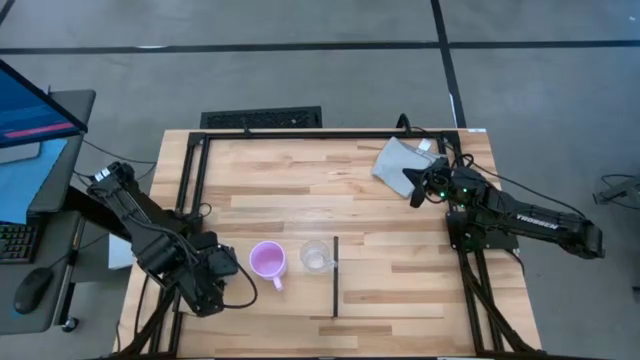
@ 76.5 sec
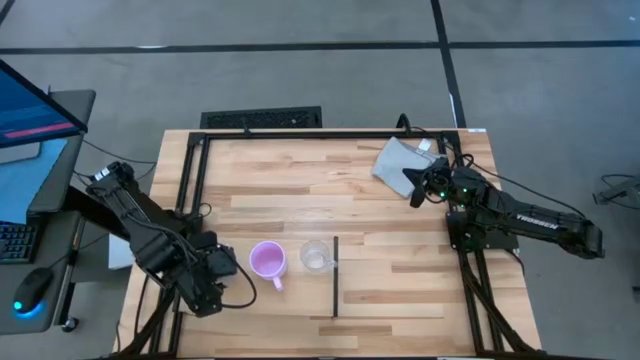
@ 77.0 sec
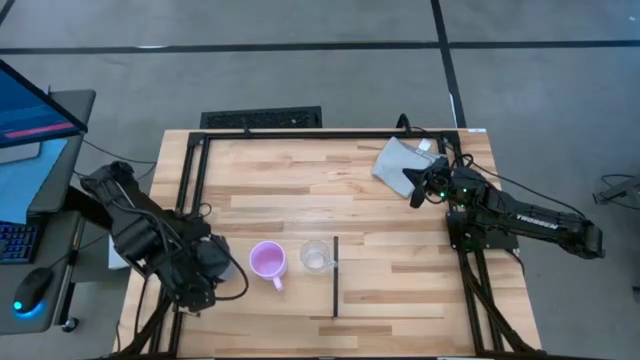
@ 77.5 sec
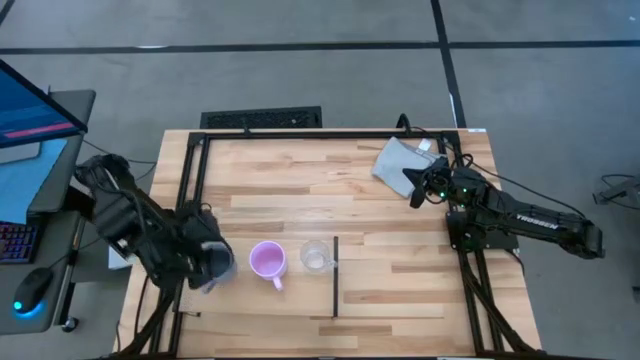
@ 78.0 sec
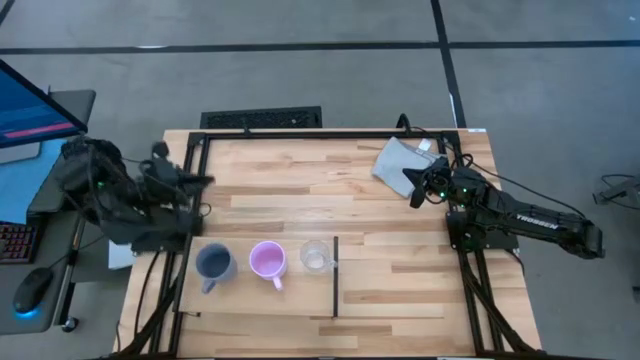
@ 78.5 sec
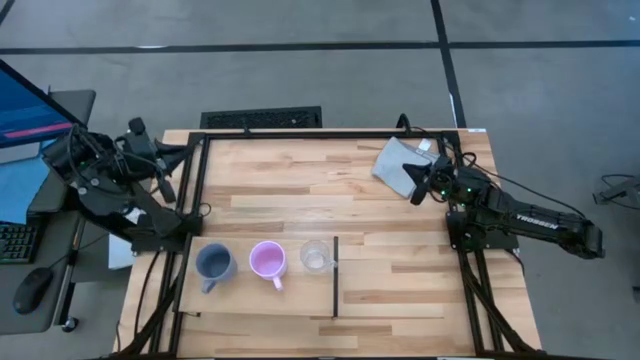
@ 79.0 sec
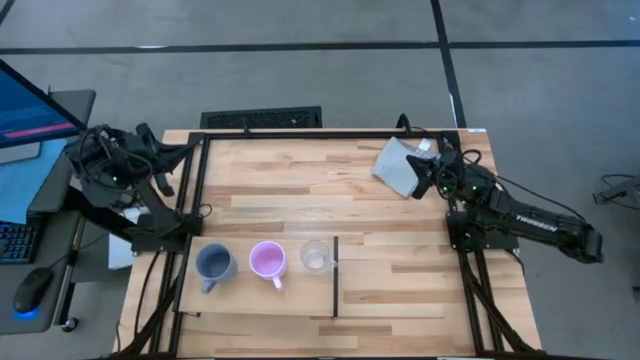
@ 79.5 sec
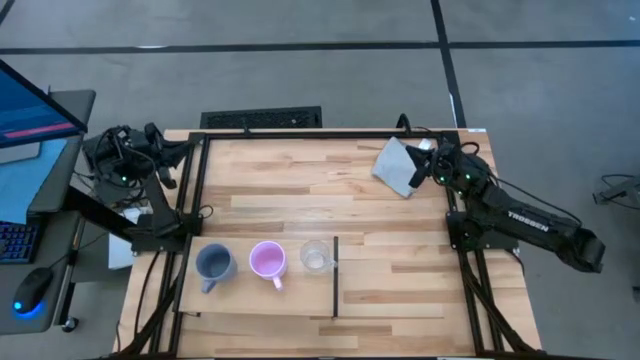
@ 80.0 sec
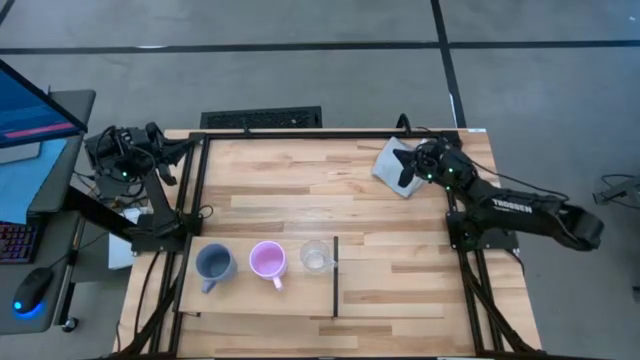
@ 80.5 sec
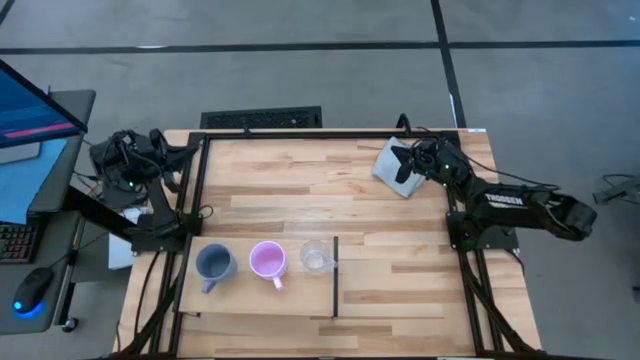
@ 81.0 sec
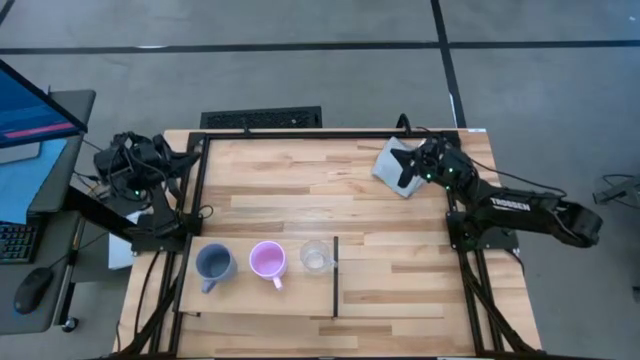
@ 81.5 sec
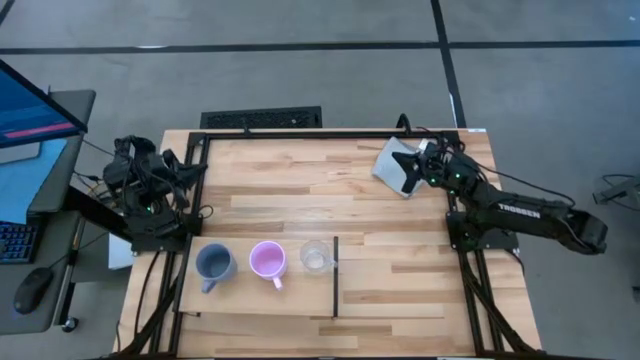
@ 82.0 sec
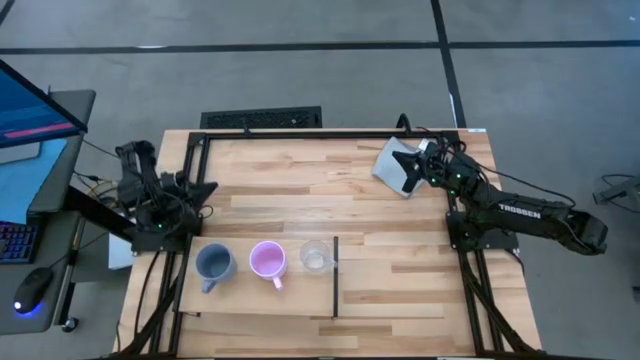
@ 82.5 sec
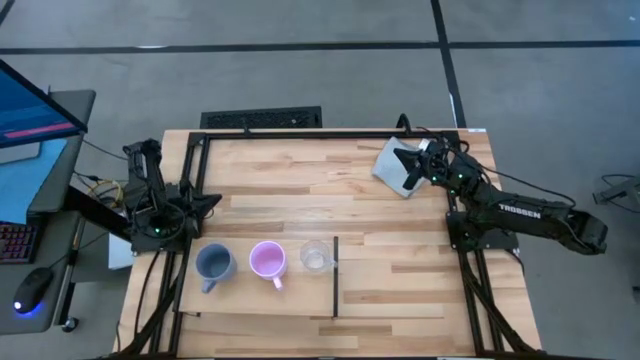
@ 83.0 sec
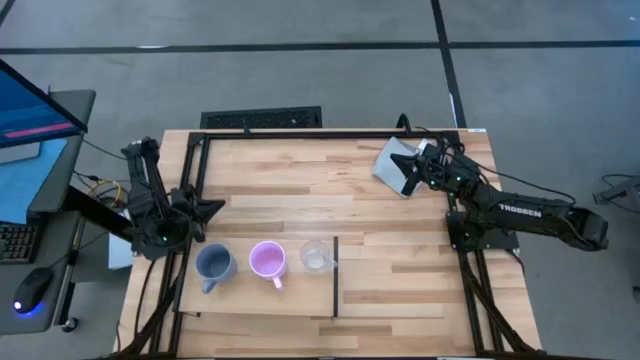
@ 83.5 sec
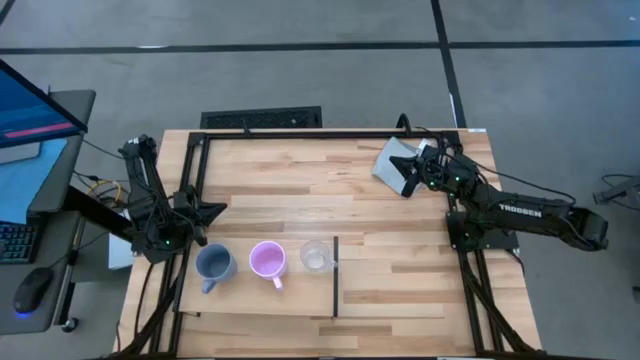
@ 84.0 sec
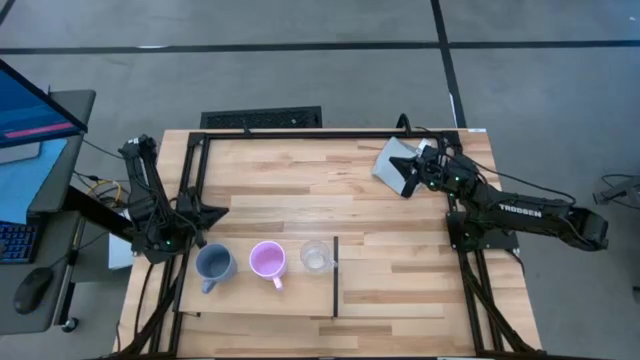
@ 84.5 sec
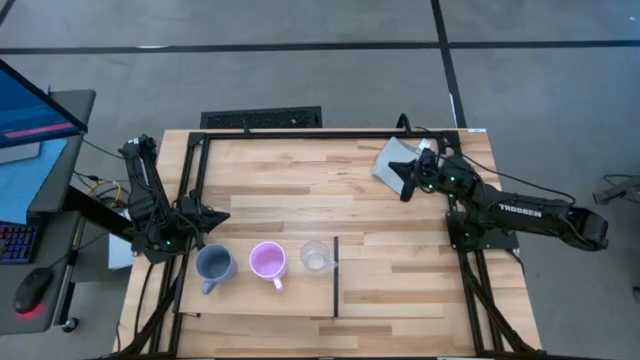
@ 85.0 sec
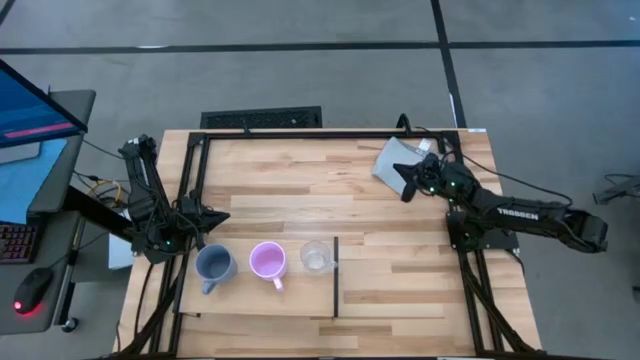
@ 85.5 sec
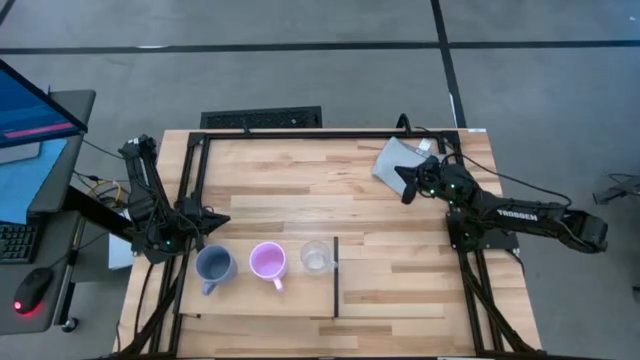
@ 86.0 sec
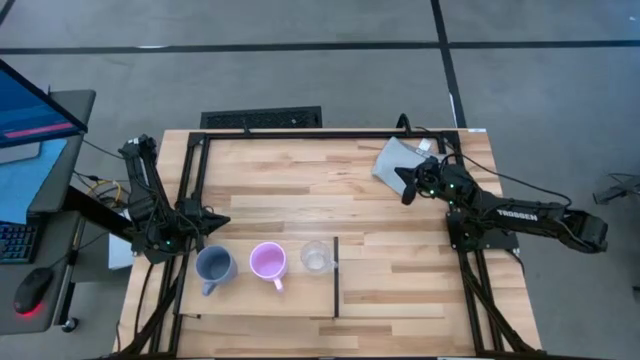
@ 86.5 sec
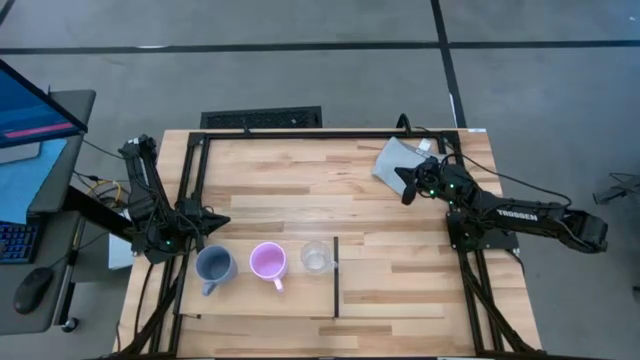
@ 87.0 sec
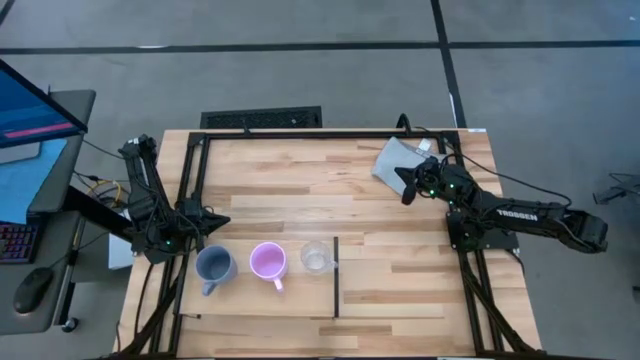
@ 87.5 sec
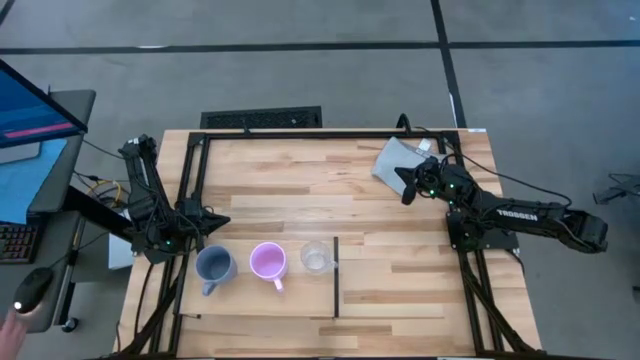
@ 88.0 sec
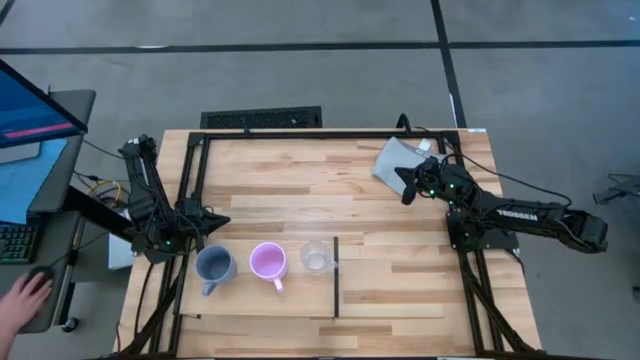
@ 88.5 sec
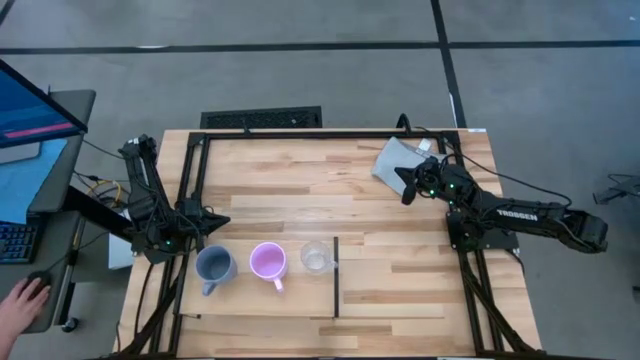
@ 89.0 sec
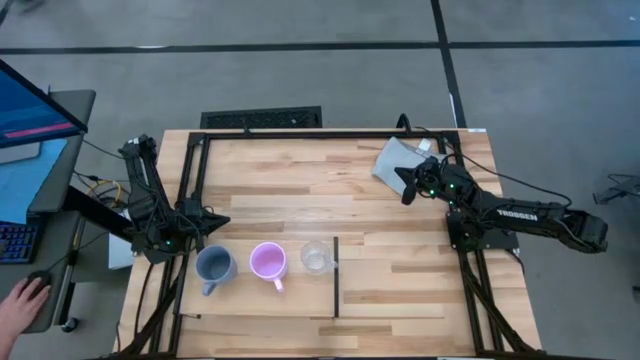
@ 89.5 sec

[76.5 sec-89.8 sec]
Task: Stack small to large cups/mugs on shelf
Return to Home Position

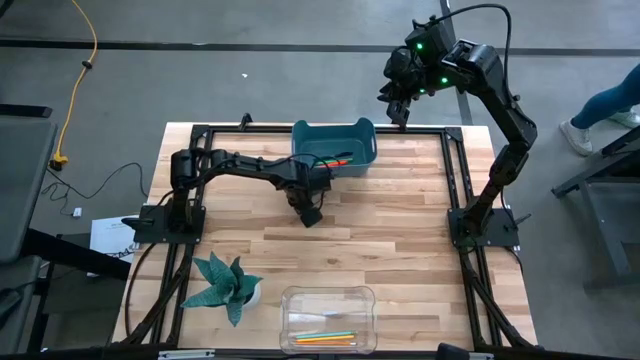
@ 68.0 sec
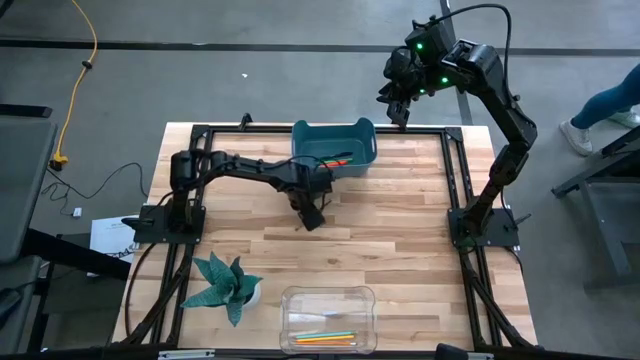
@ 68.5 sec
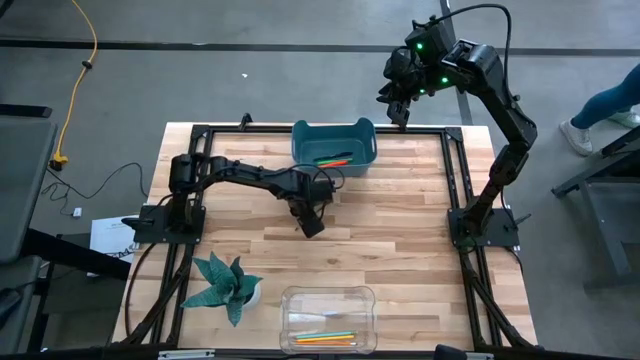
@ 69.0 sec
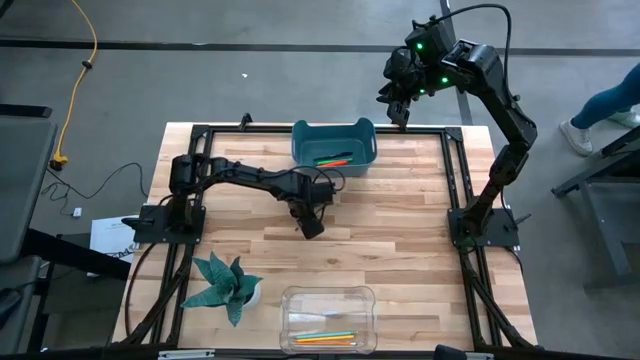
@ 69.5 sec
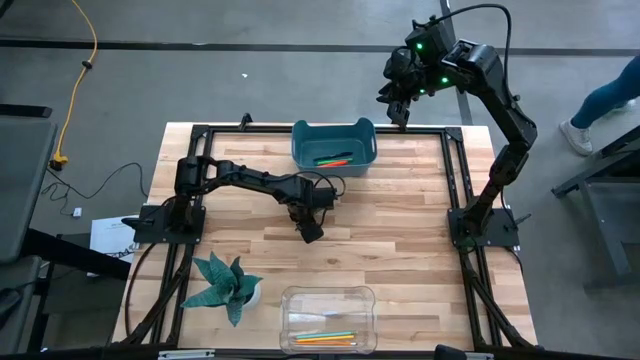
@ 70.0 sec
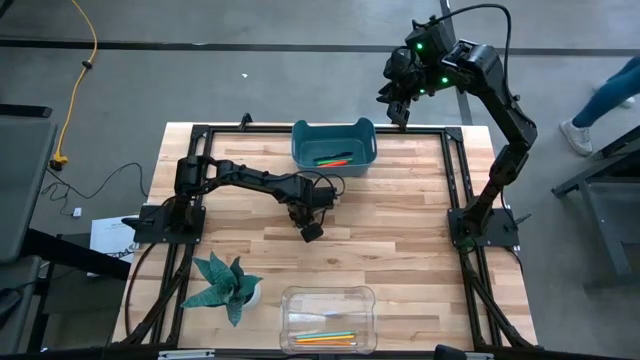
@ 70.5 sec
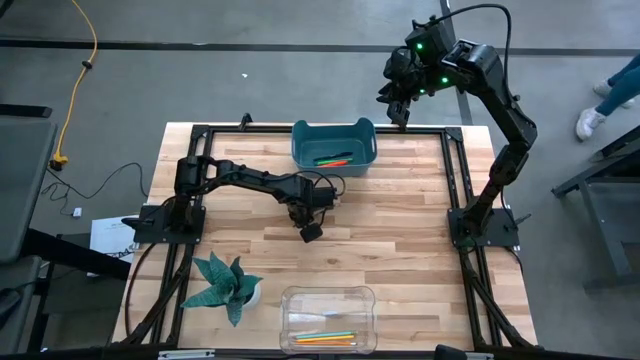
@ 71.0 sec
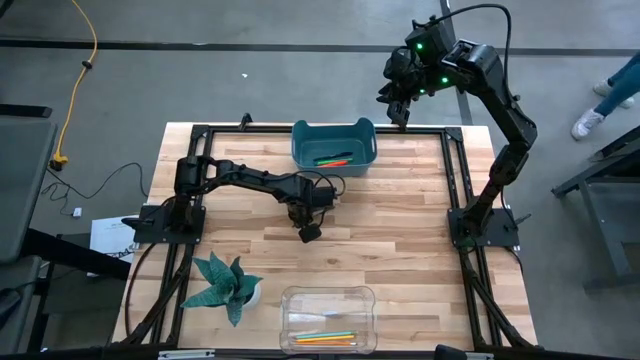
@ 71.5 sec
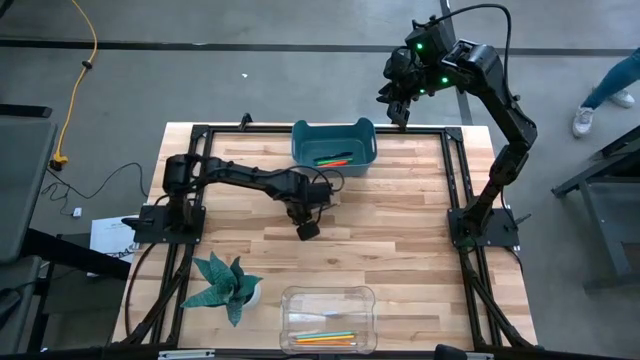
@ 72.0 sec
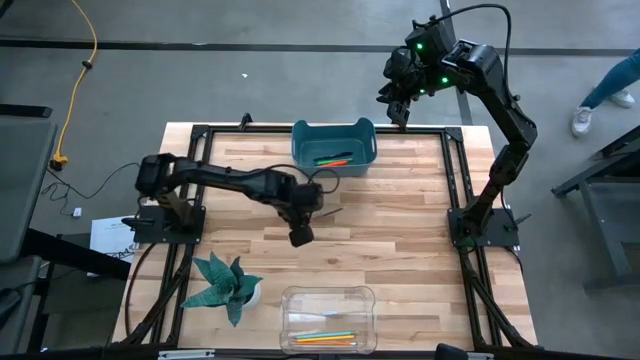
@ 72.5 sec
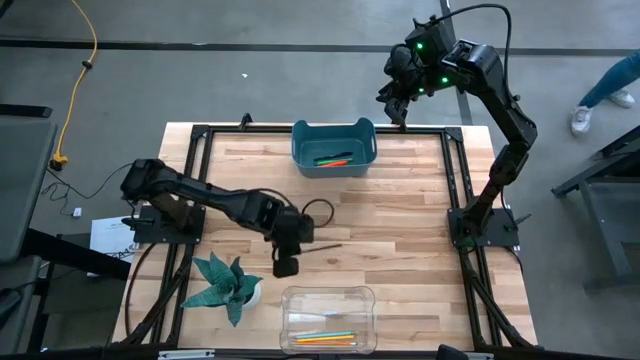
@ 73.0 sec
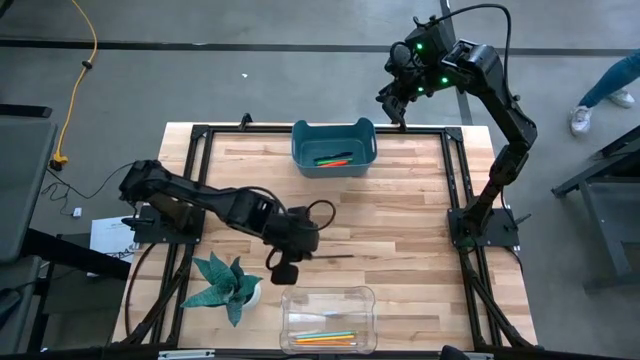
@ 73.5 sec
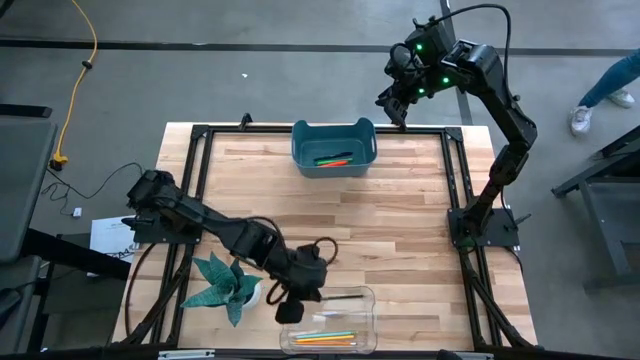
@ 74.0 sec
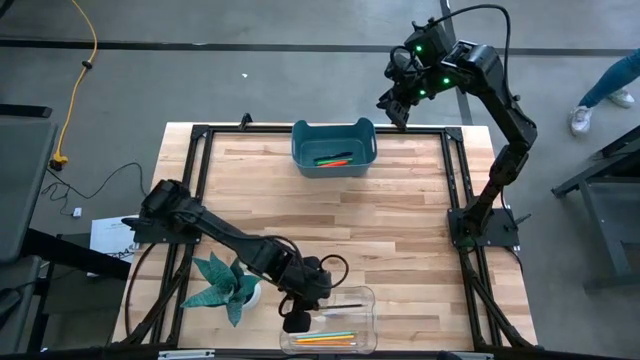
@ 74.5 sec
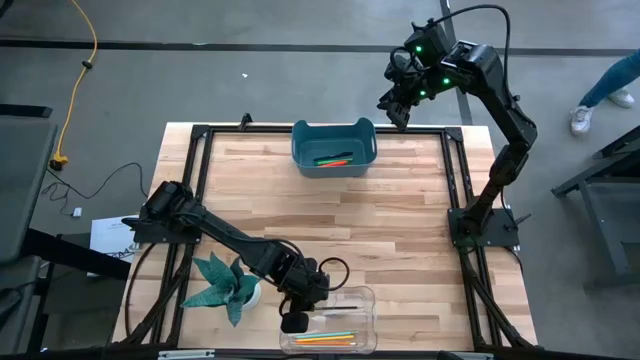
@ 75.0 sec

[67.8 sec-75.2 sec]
Task: Sort pens & pencils
Put the black pencil into the transparent bin
